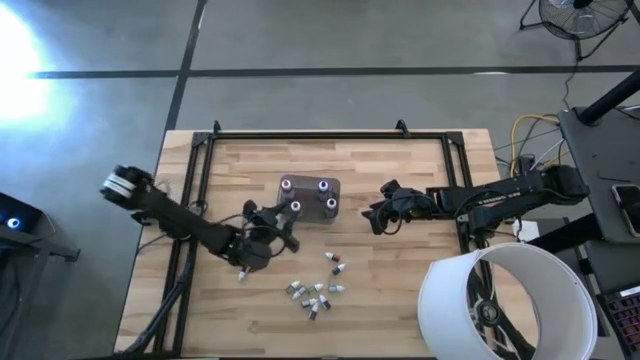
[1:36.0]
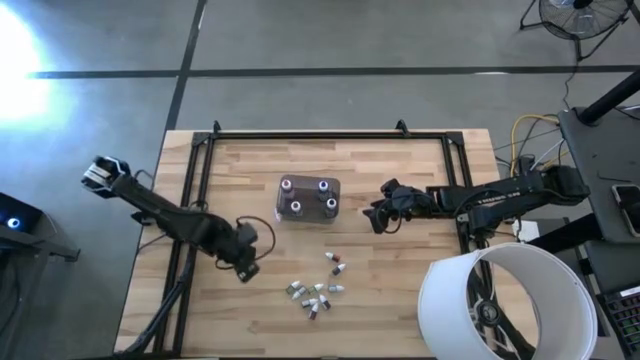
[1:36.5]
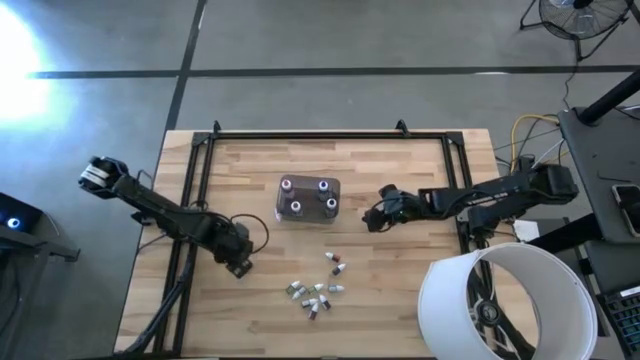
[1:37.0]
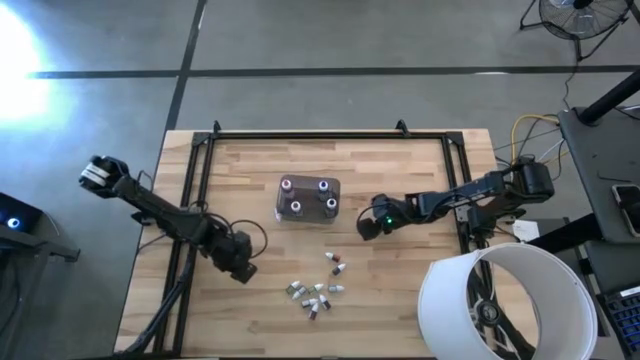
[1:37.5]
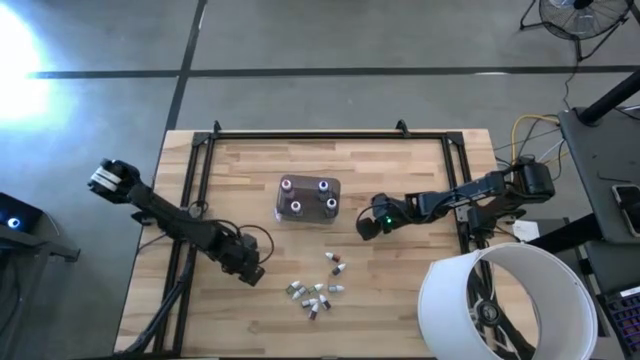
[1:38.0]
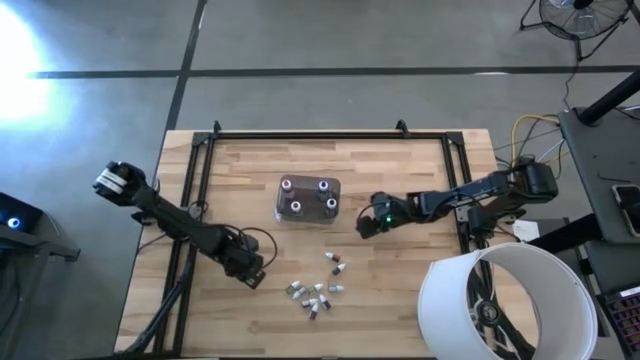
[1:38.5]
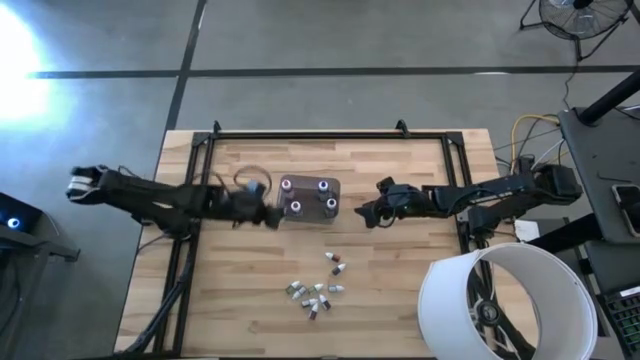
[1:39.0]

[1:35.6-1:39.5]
Task: Pick & Place food coloring
Put the bottom small black food coloring bottle into the black bin

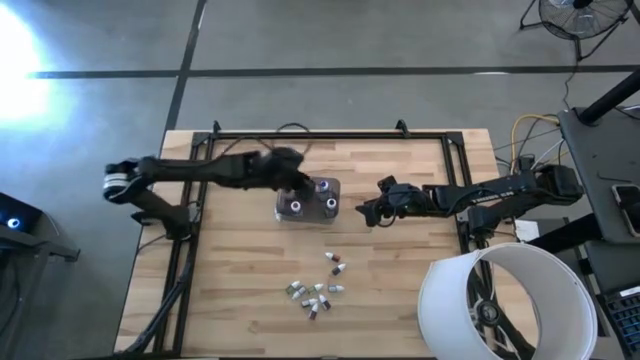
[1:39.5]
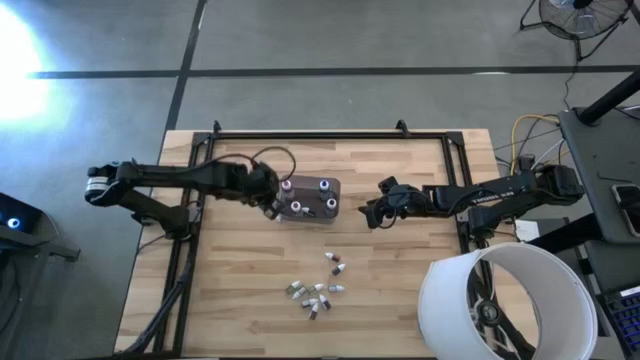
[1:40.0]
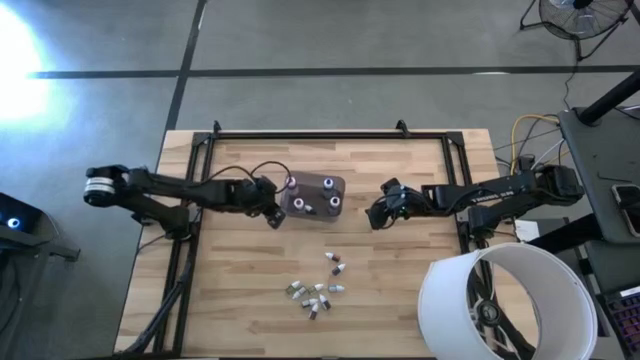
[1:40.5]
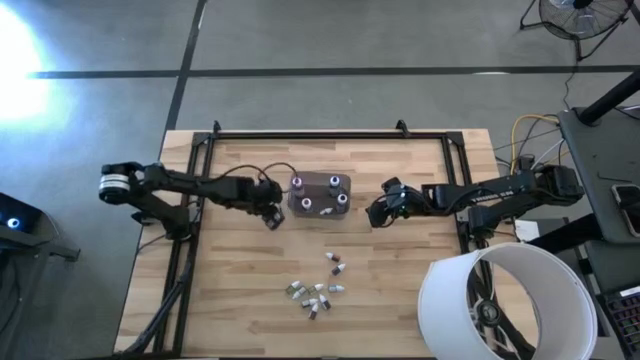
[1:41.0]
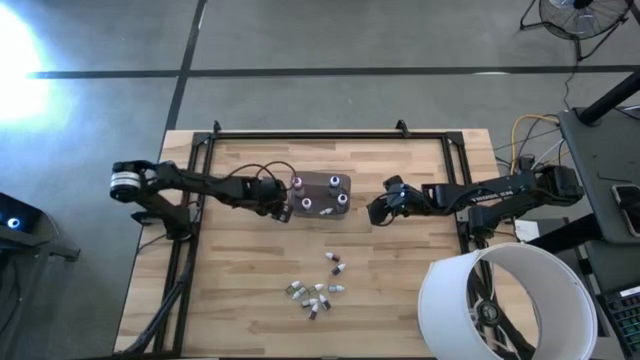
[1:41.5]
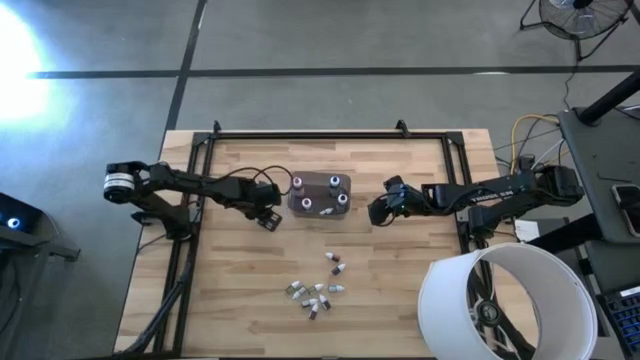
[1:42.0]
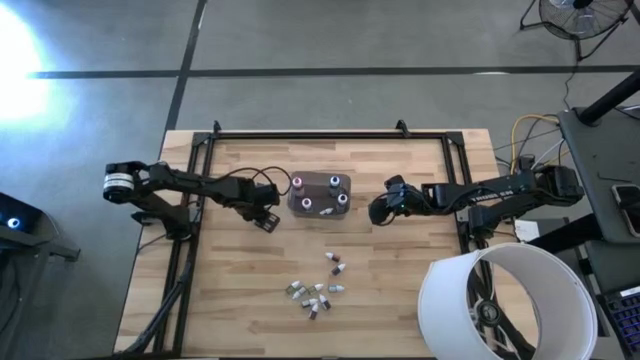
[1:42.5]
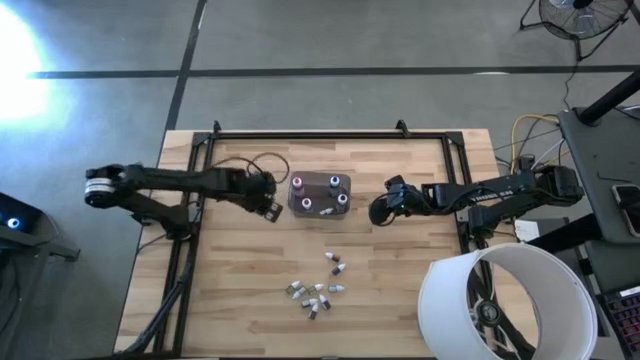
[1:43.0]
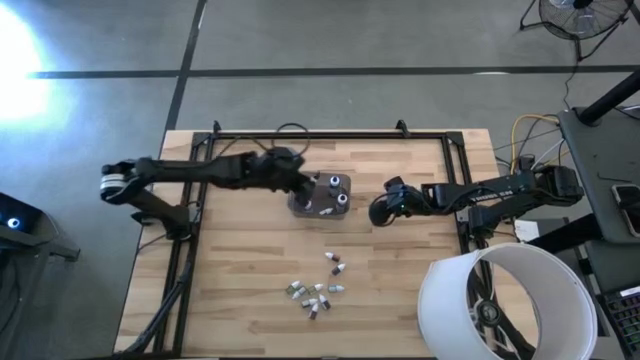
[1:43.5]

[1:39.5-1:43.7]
Put the small black food coloring bottle into the black bin

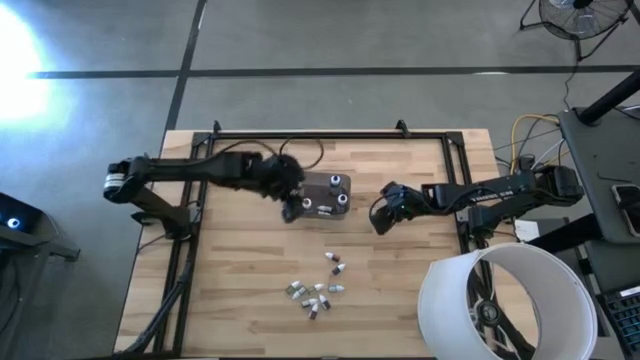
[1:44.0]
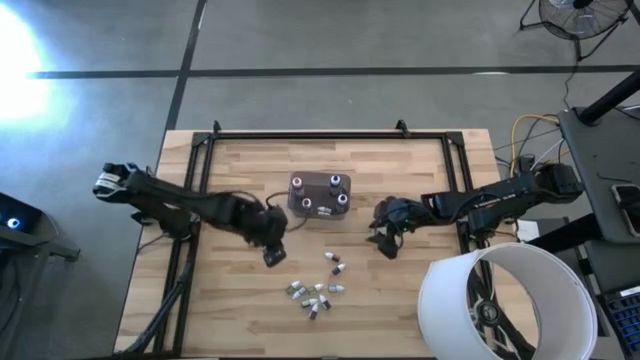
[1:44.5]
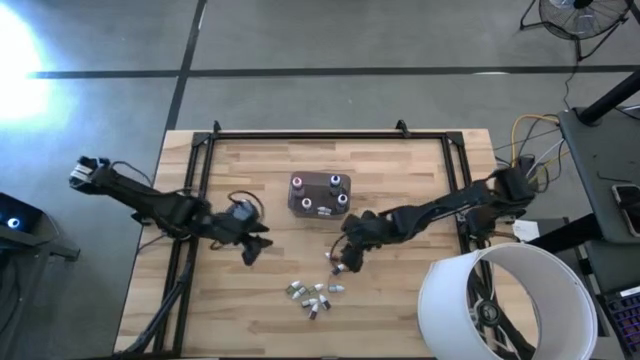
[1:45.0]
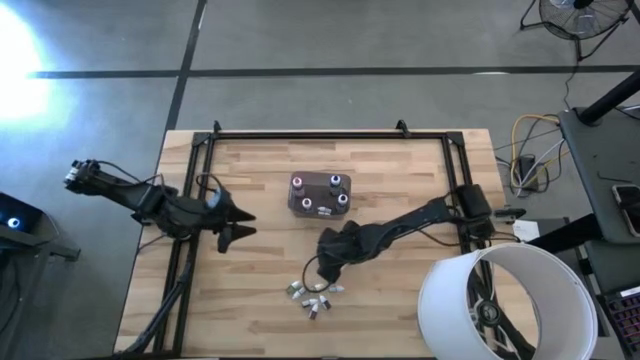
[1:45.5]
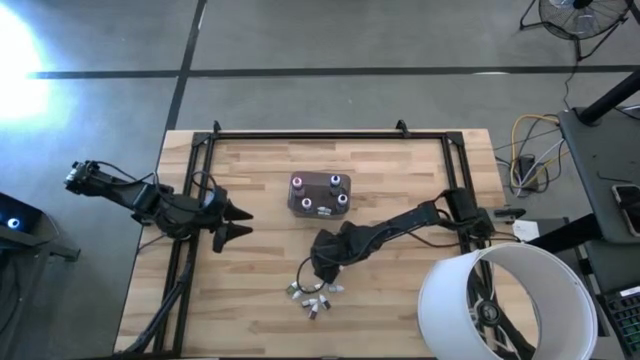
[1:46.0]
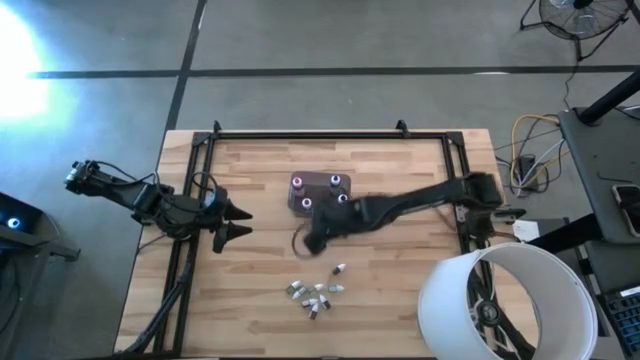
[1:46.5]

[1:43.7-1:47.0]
Put the top small red food coloring bottle into the black bin

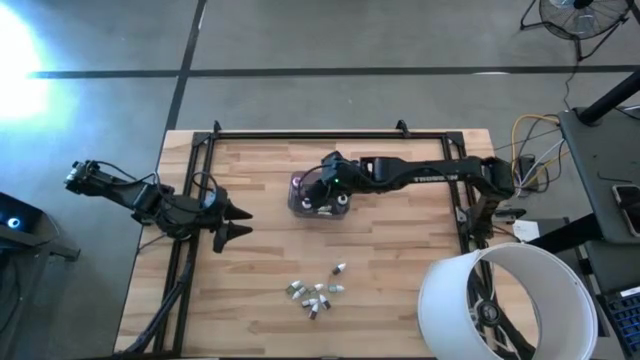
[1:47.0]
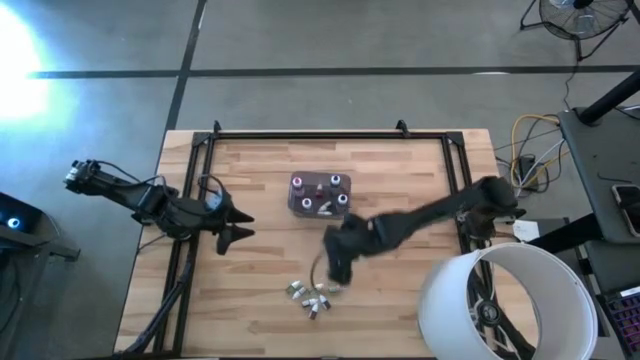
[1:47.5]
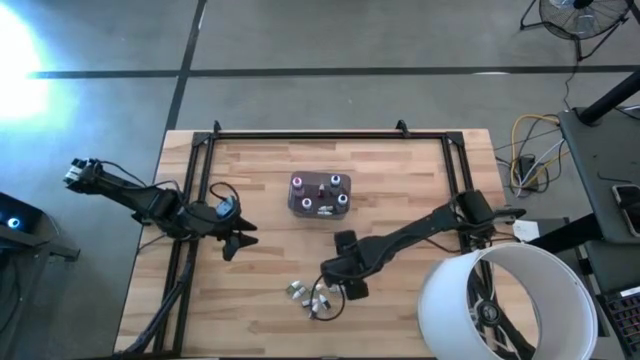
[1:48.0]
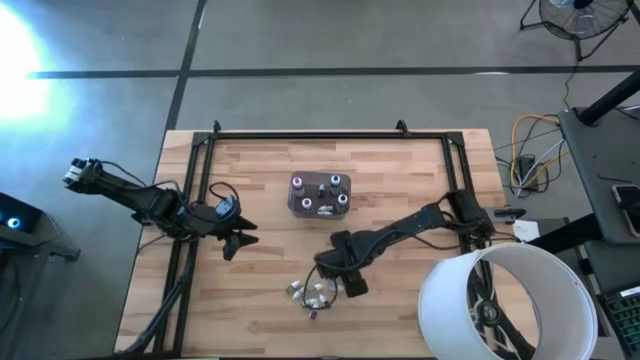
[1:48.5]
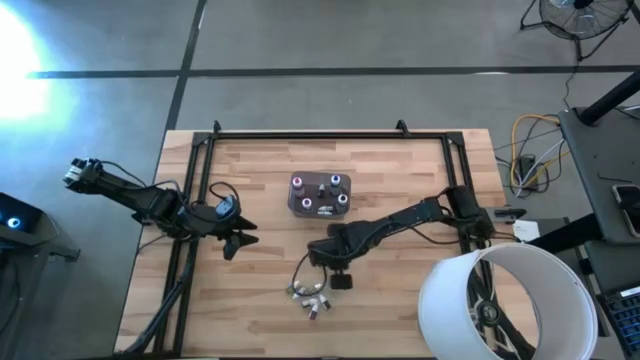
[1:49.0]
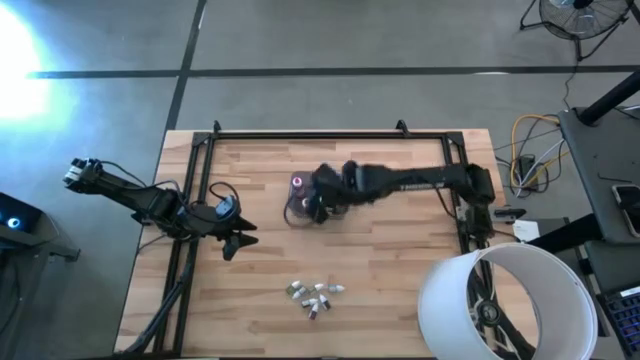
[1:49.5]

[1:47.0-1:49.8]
Put the top small red food coloring bottle into the black bin

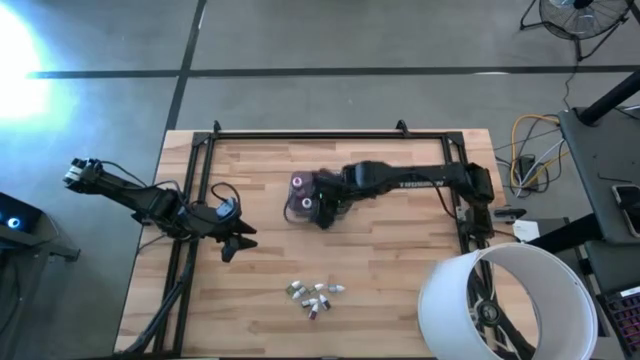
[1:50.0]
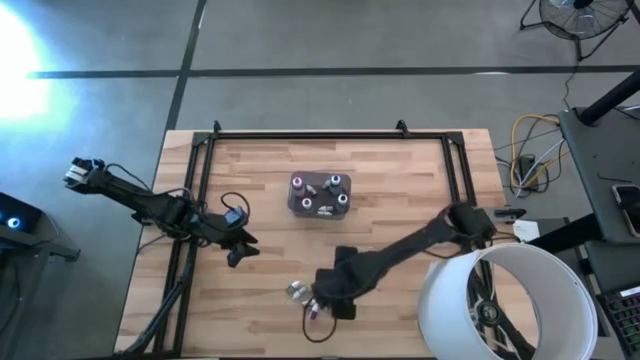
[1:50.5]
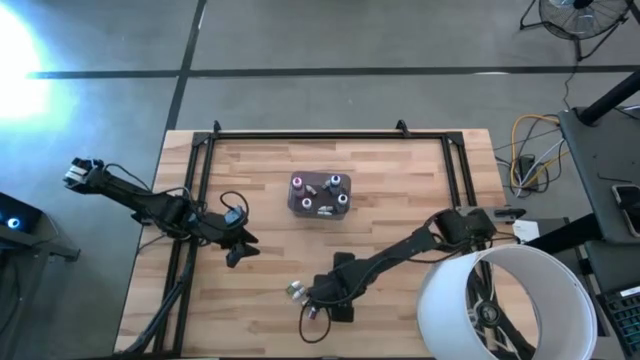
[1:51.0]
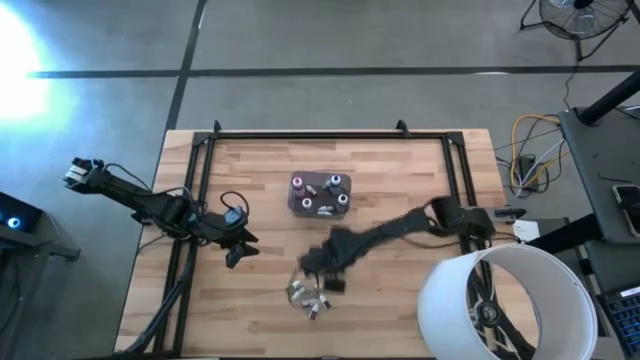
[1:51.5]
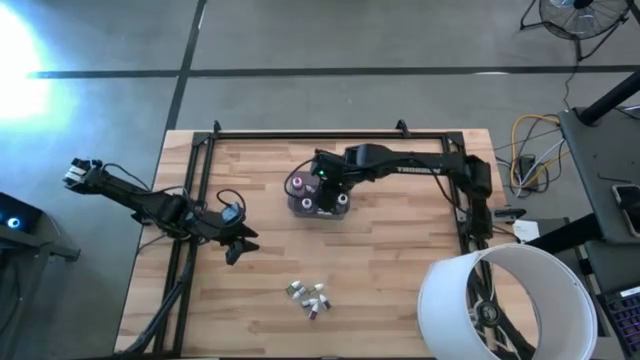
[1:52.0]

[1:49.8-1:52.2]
Put the small blue food coloring bottle into the bin

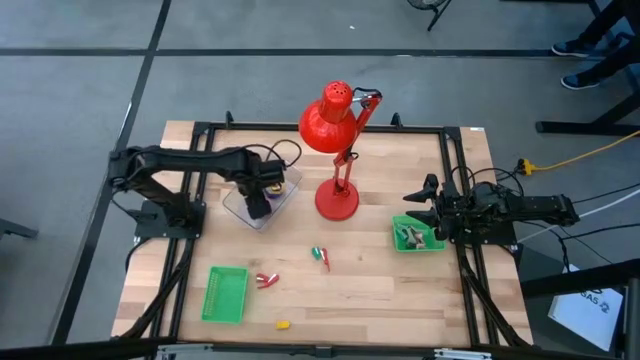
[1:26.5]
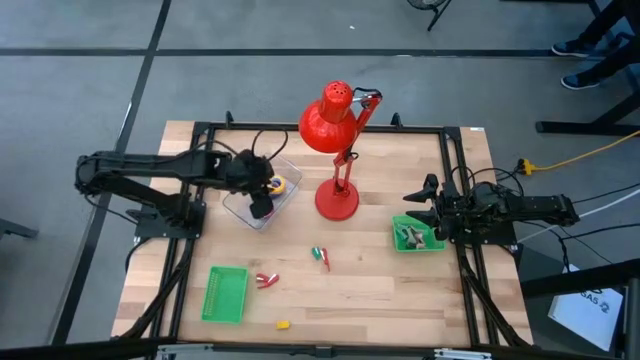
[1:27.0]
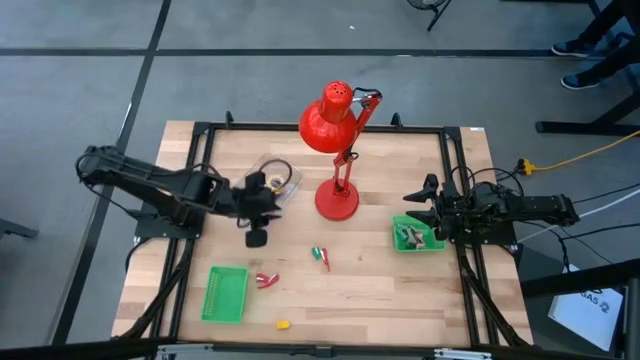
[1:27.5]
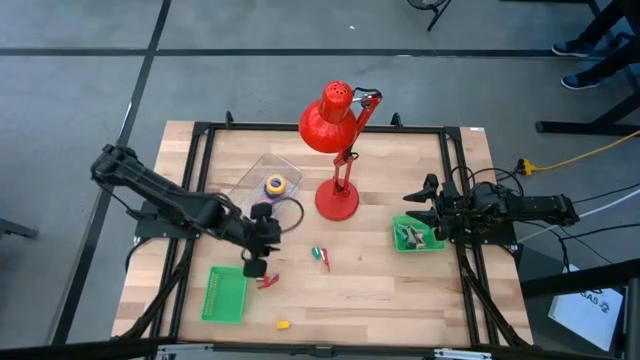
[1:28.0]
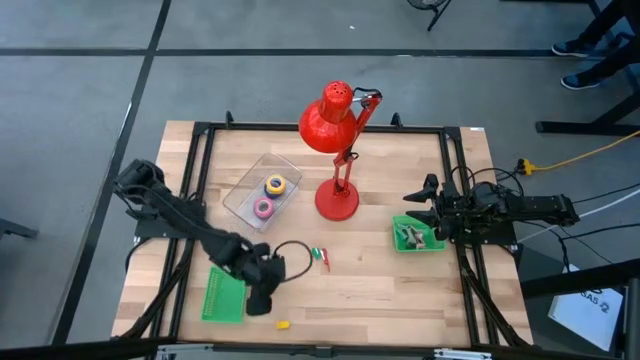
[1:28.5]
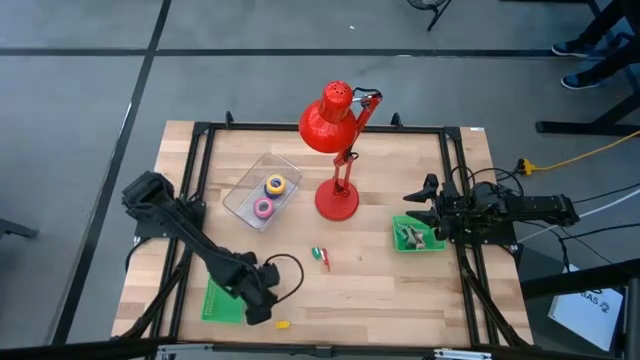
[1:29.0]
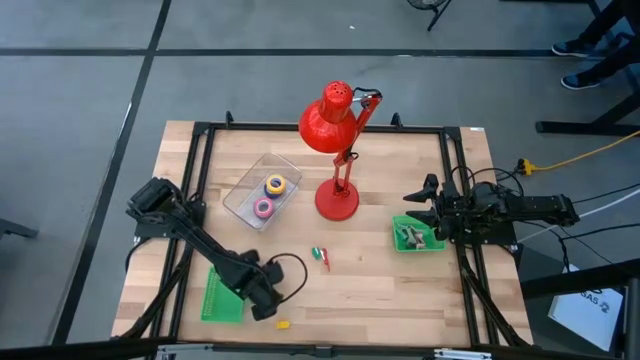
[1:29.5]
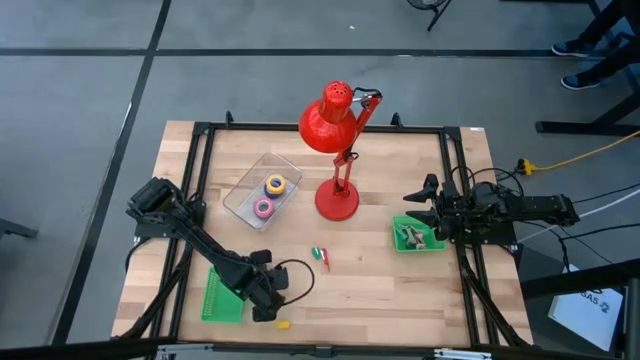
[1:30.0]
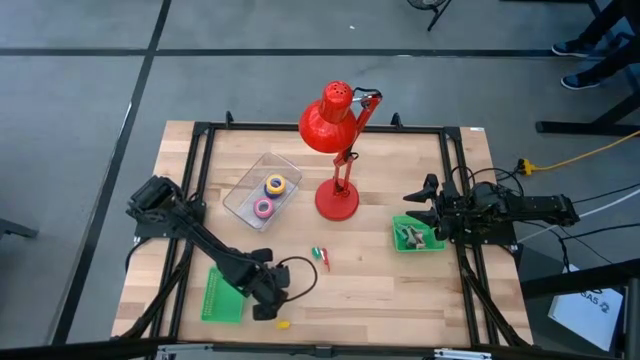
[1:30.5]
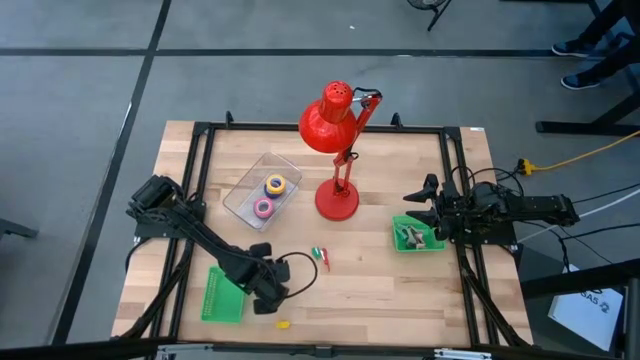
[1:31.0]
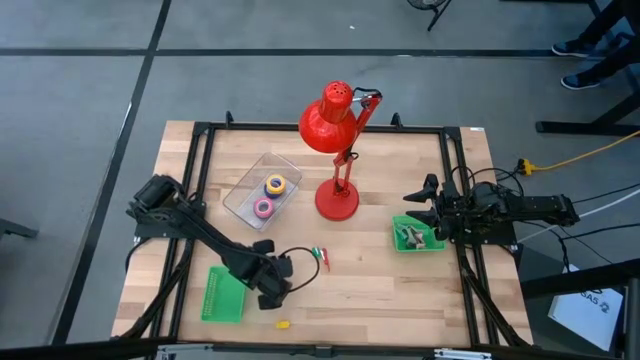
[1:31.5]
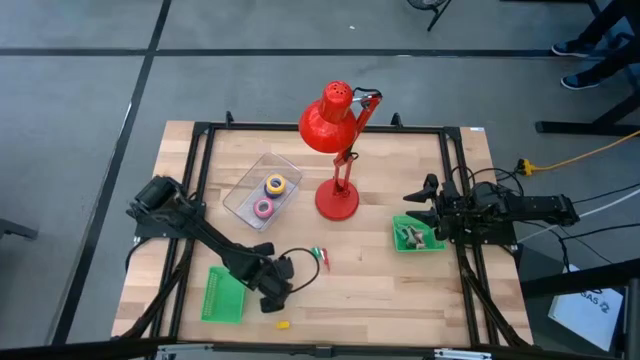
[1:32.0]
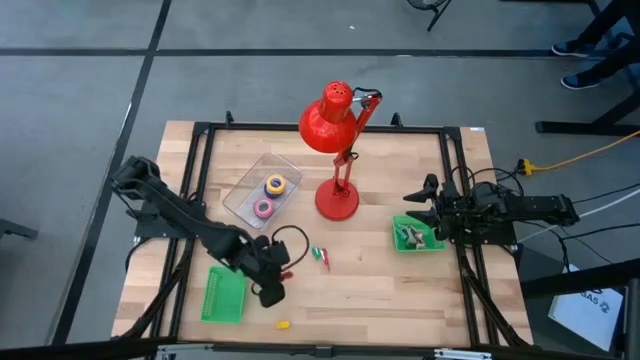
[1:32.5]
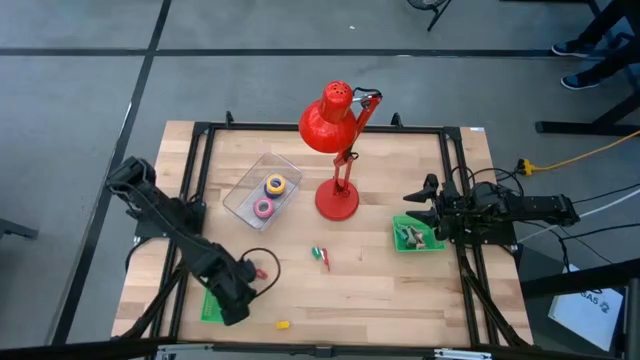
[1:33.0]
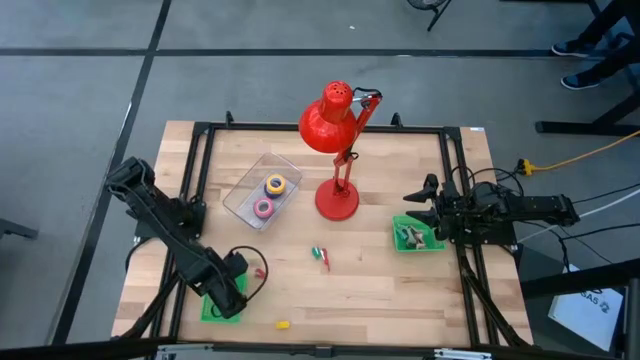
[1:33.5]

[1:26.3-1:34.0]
Task: Pick and place Stapler, Stapler remover, tape
Put the bottom right red stapler into the bottom green basket
